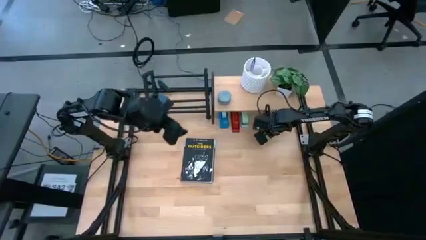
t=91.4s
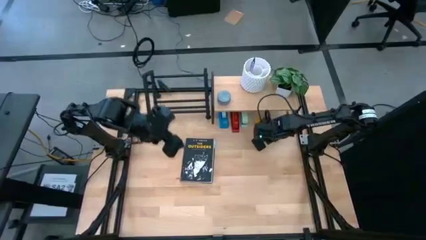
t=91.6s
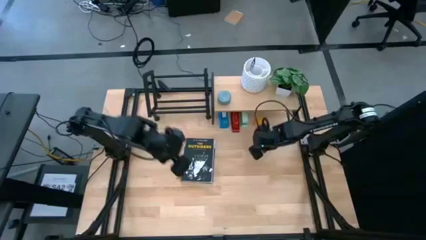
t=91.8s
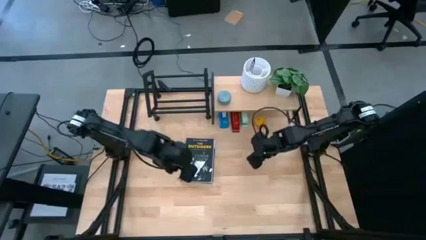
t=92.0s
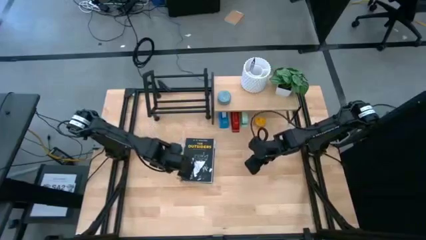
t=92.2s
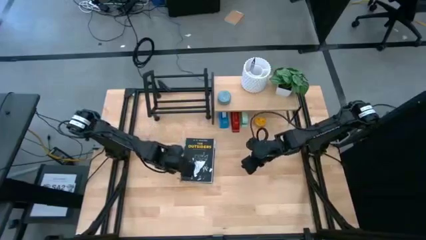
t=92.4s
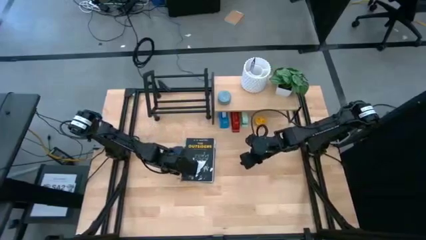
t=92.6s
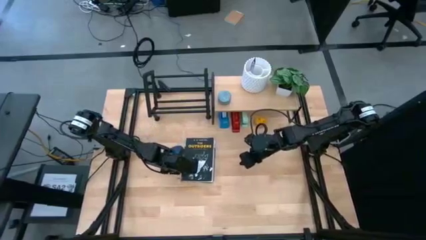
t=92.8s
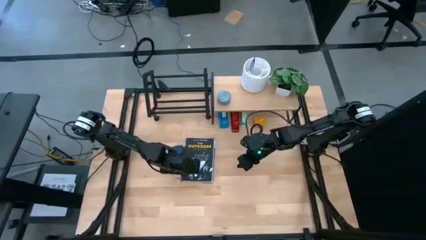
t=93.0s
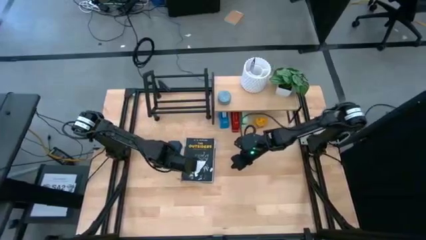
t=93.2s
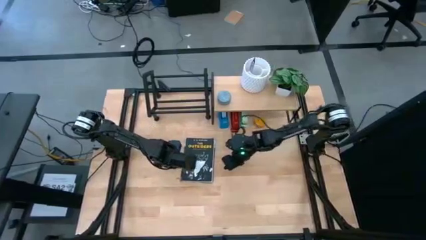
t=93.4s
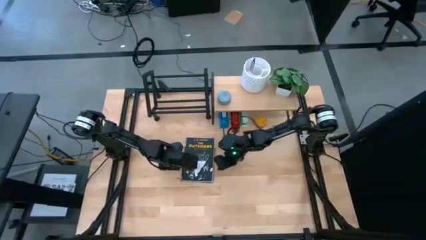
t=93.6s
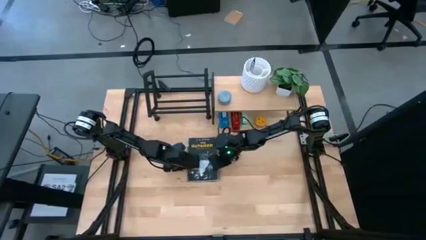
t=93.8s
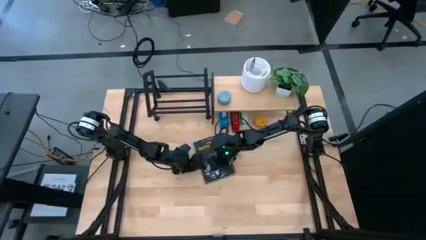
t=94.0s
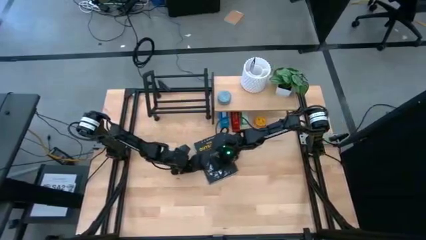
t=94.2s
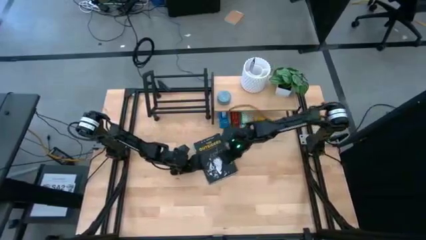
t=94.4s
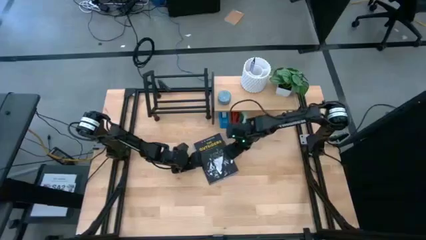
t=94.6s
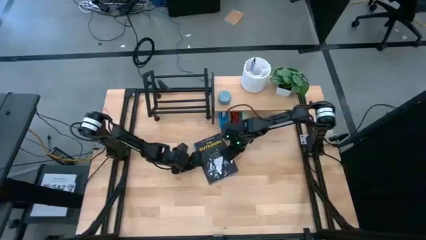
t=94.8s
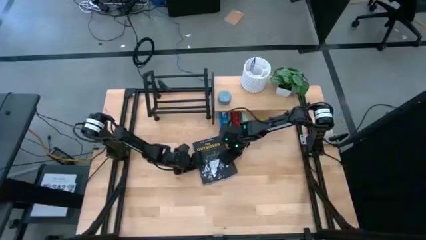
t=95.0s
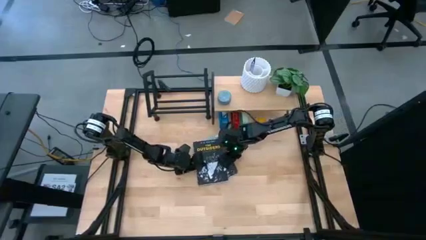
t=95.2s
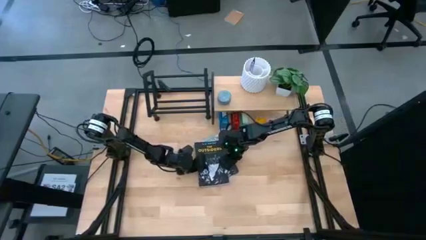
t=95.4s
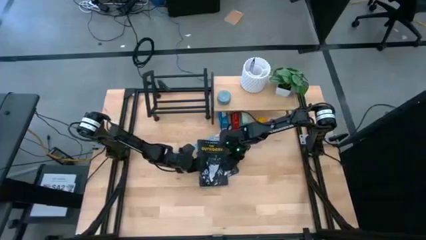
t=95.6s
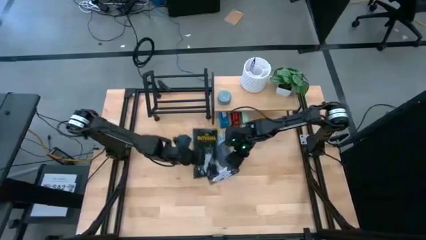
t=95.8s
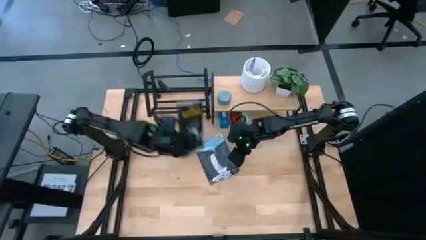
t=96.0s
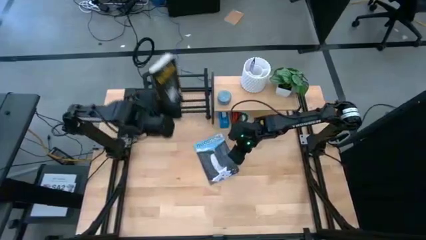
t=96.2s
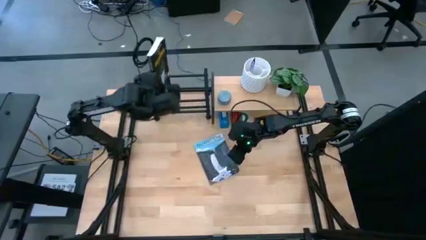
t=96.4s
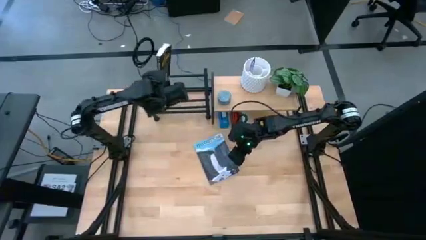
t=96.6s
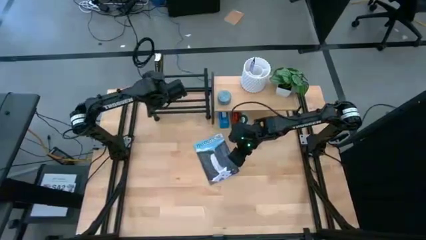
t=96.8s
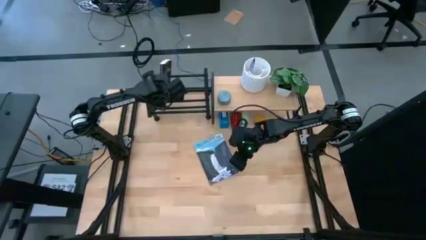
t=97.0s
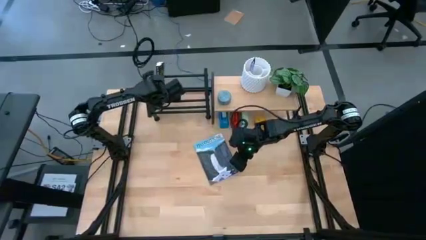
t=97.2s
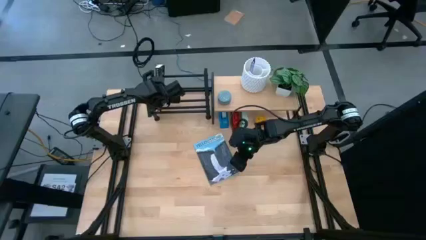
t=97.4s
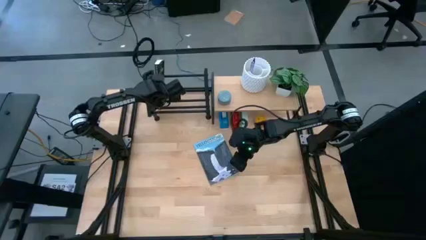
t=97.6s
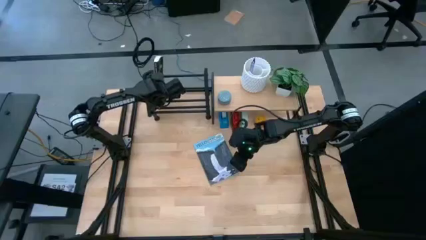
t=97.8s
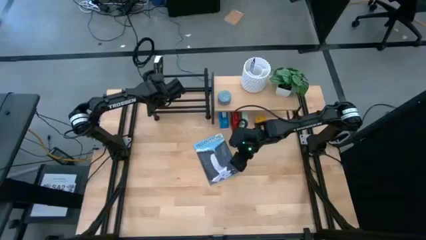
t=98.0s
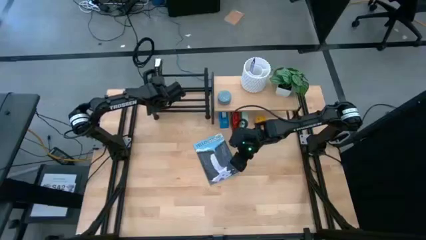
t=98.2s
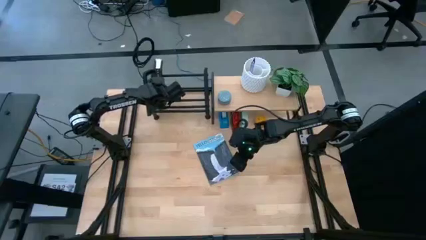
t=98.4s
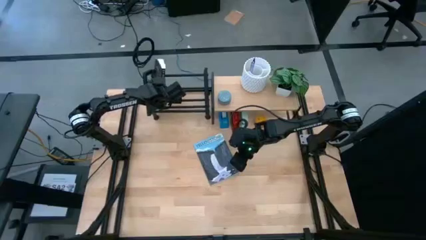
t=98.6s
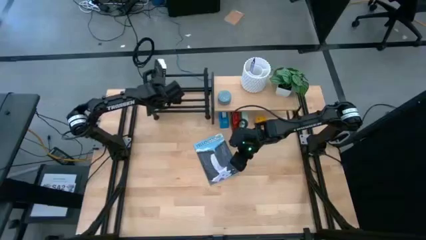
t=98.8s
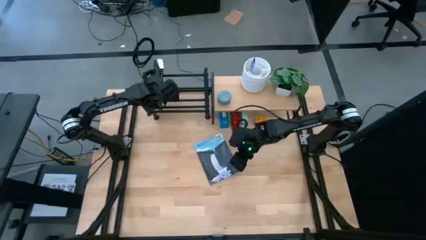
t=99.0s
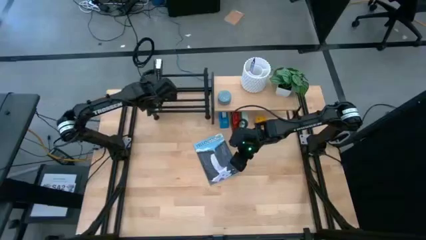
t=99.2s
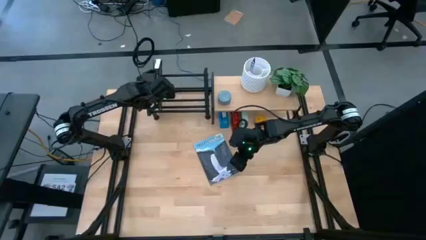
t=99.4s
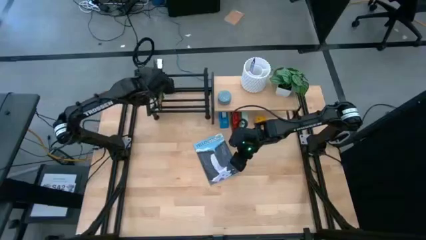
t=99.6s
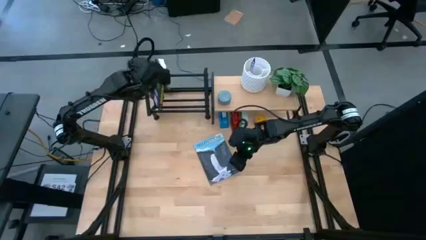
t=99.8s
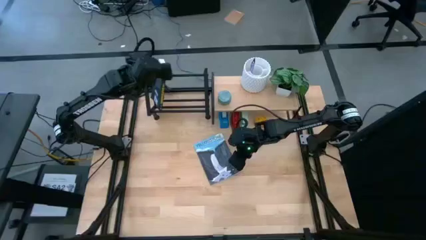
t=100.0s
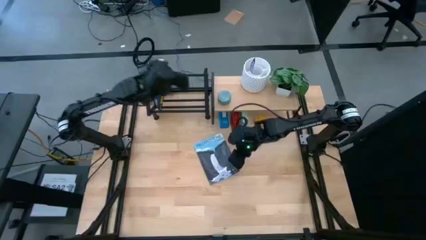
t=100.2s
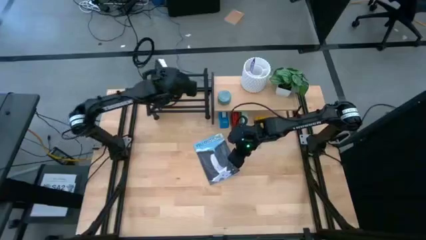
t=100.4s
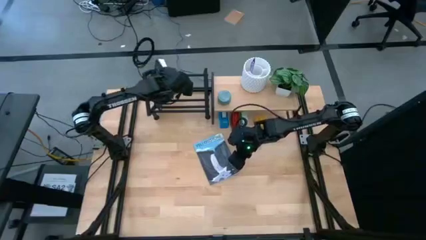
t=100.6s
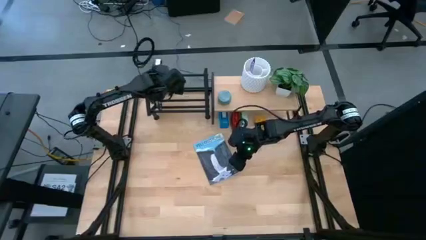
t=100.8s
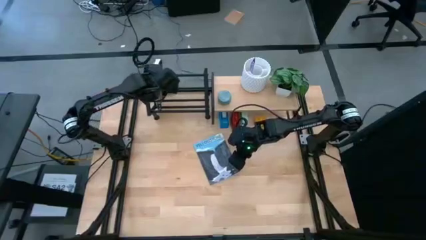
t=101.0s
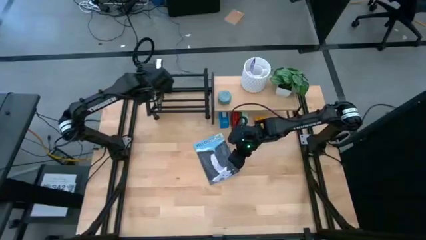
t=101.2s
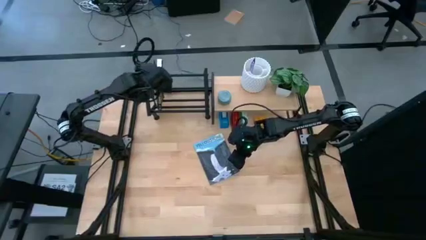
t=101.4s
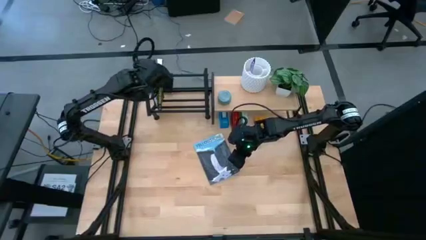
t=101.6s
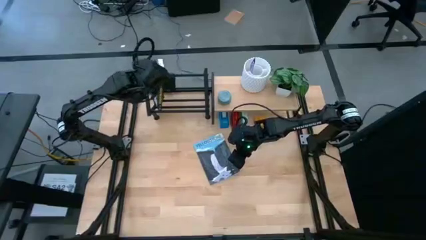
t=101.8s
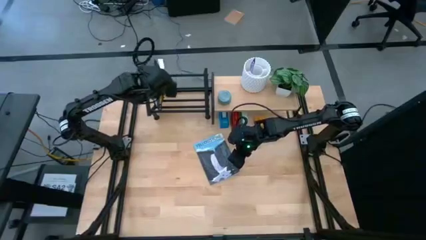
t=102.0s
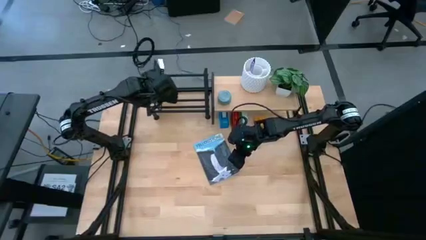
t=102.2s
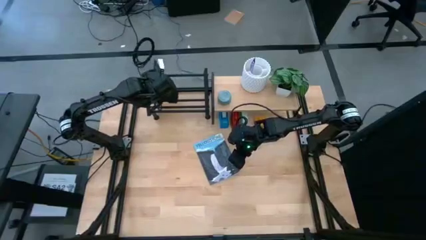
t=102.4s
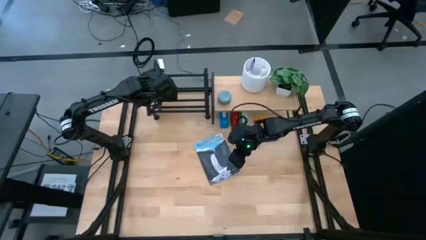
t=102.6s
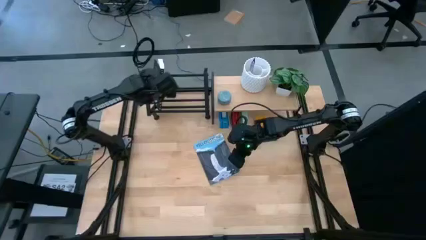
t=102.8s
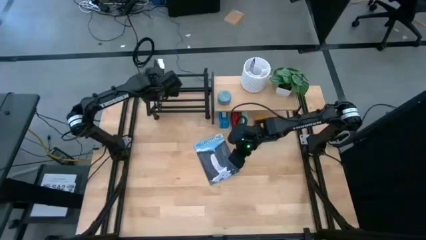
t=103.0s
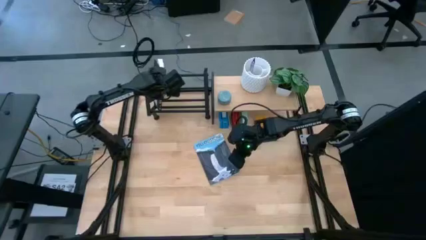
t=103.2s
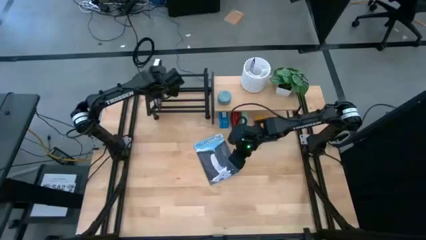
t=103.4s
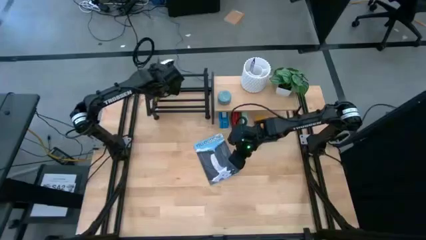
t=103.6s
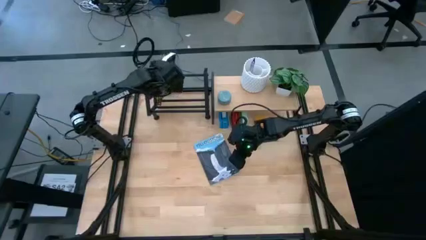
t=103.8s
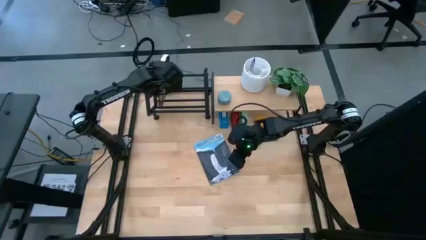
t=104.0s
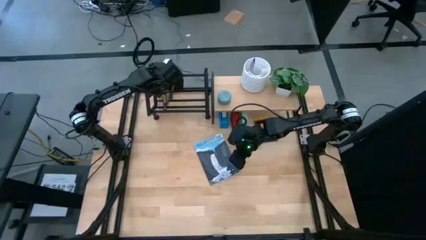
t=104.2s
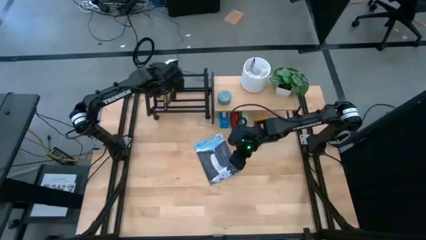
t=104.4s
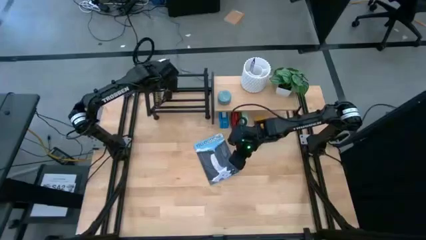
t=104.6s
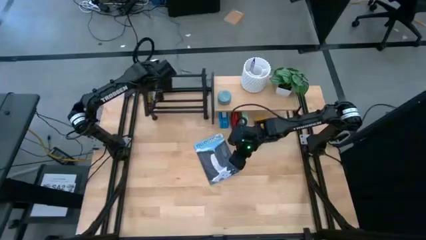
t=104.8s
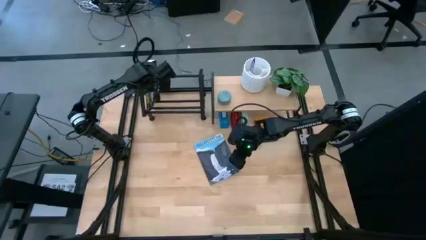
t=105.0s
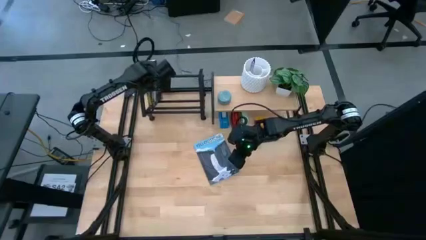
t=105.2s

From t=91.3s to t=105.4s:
Task: Stock shelves
Put the black book into the black book shelf

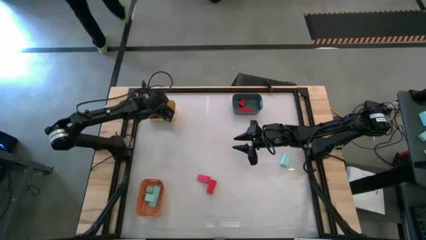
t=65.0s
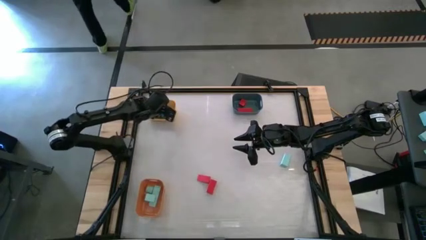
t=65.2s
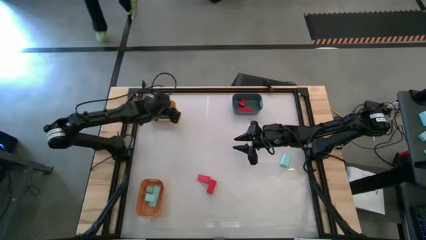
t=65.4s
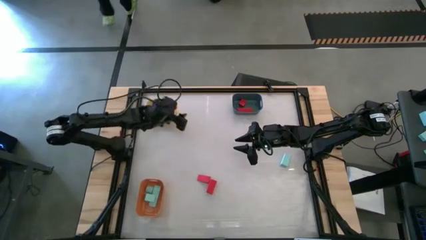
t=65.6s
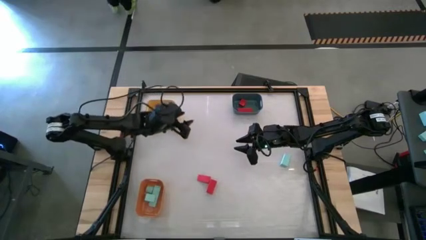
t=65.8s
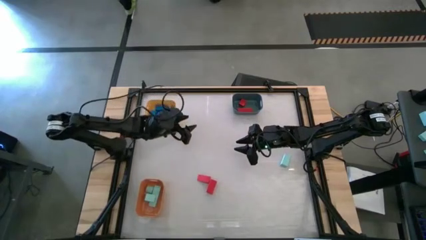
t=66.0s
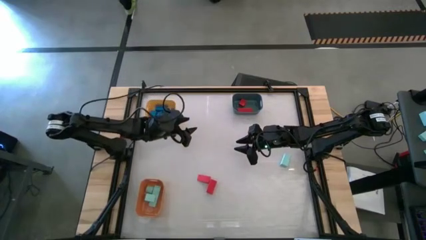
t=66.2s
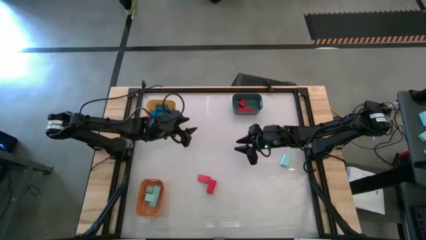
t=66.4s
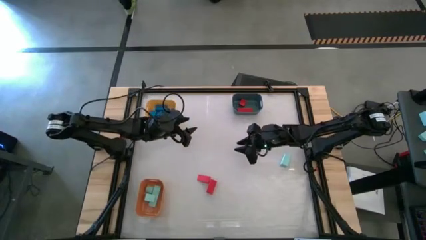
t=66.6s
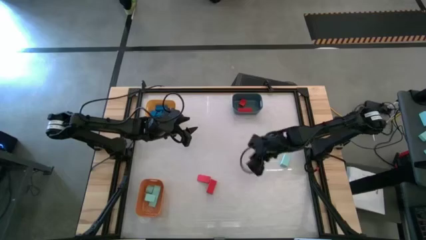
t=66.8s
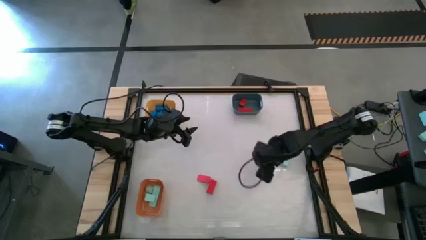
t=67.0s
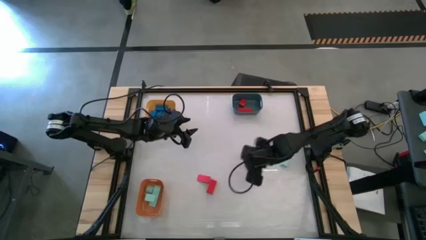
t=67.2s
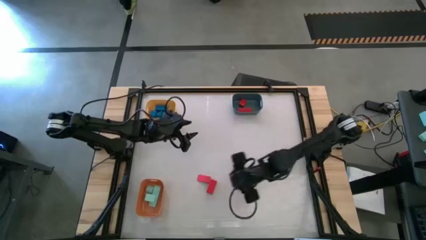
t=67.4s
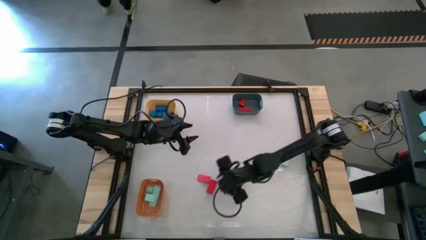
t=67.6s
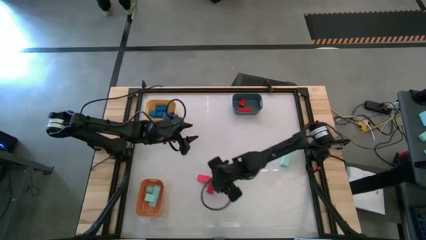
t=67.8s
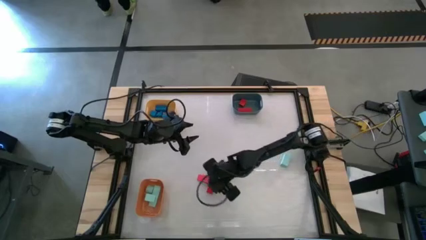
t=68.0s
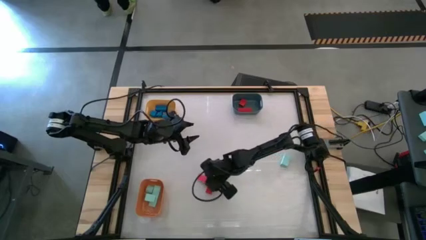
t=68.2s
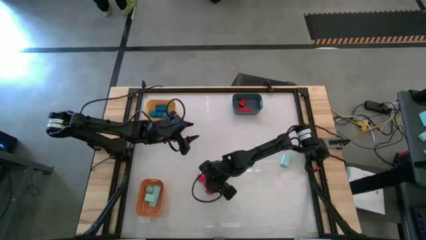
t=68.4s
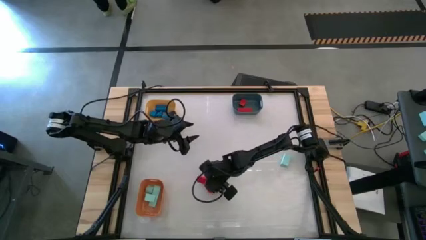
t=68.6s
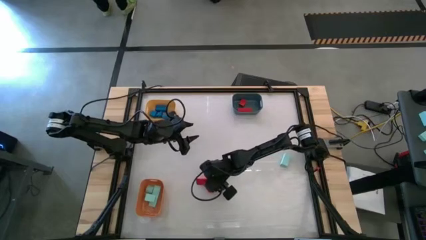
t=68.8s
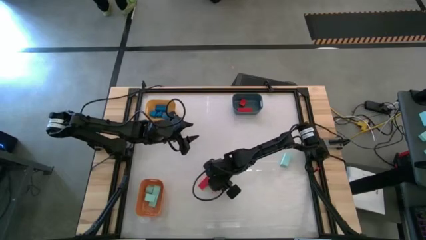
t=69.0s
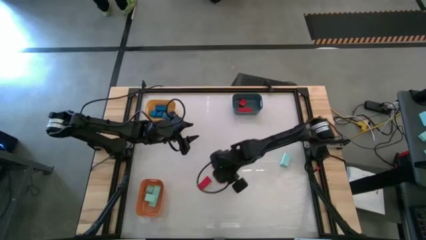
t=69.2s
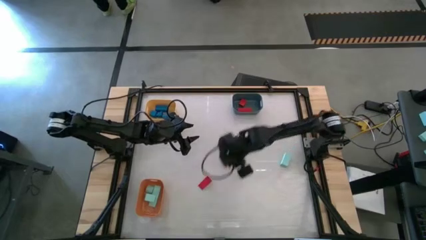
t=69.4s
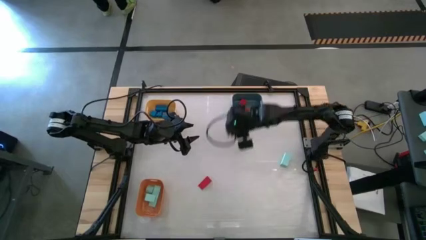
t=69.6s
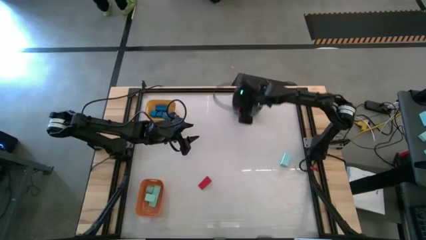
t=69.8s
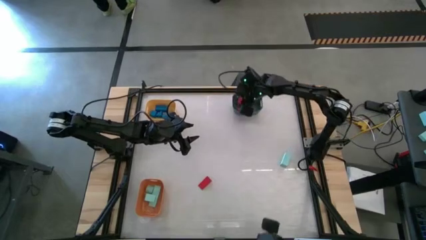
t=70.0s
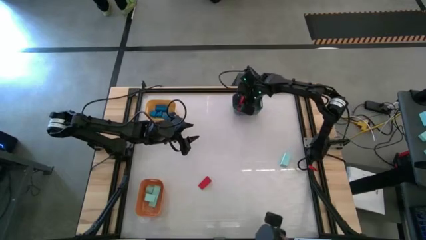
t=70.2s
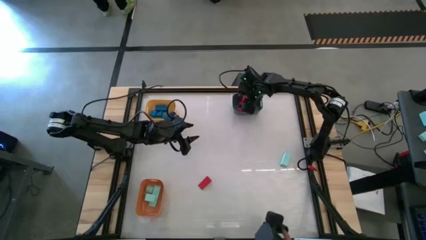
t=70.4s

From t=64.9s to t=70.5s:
Task: Sort & place blocks by color
Put the right red block into the blue bin
